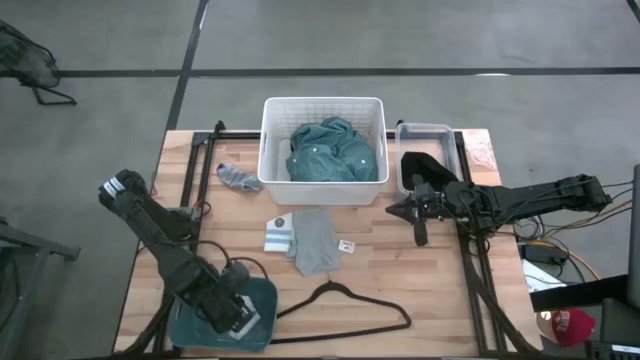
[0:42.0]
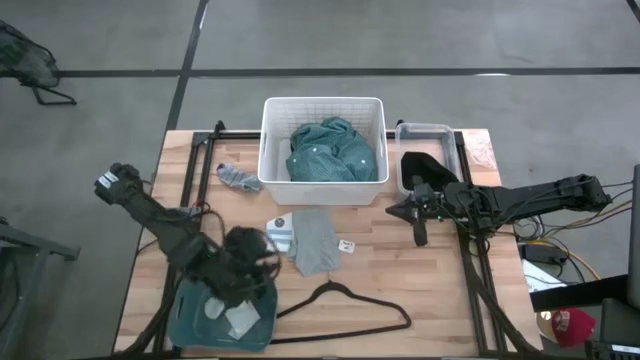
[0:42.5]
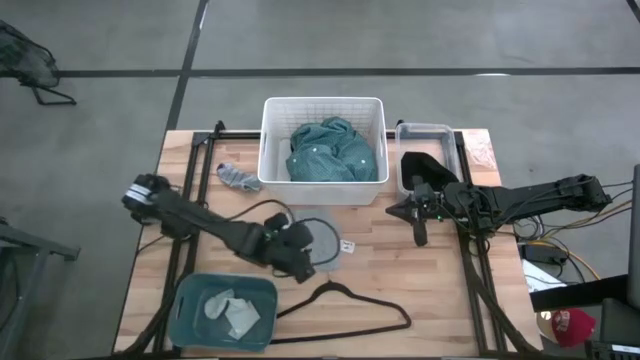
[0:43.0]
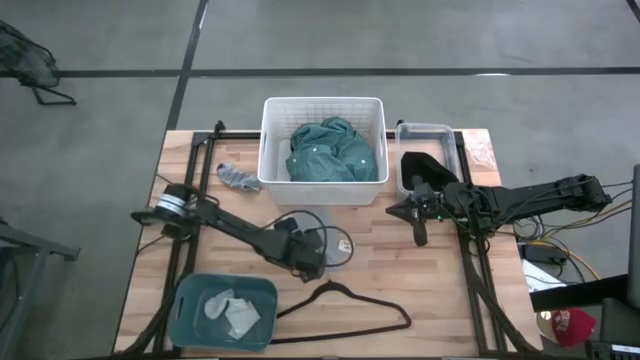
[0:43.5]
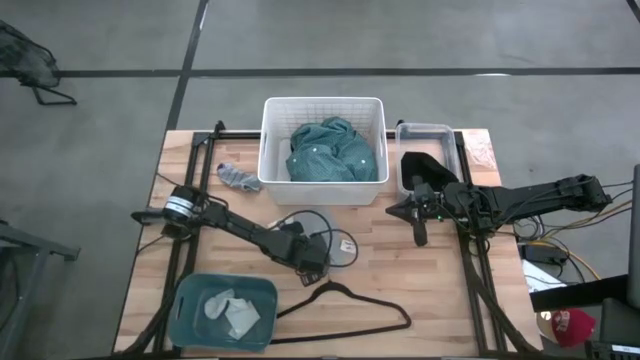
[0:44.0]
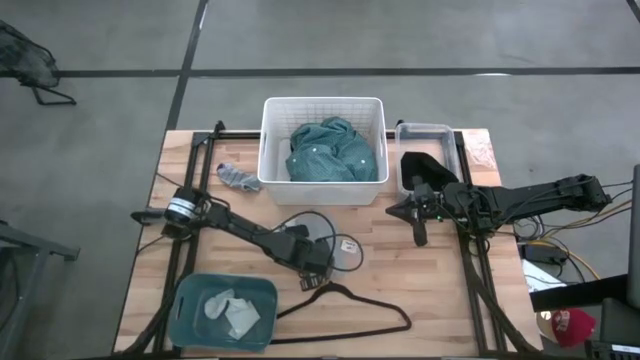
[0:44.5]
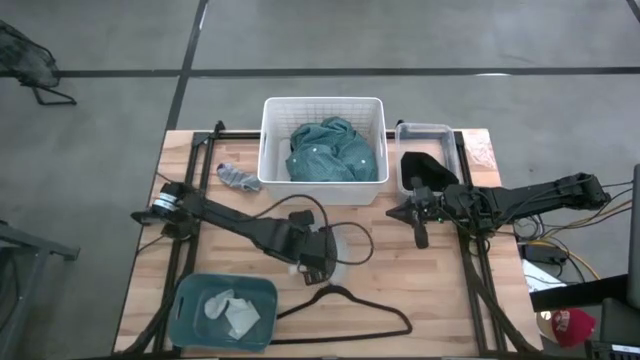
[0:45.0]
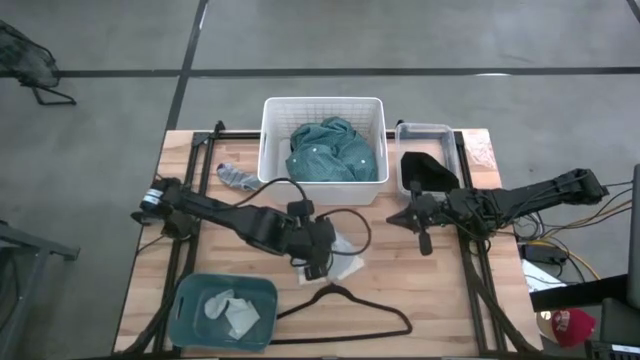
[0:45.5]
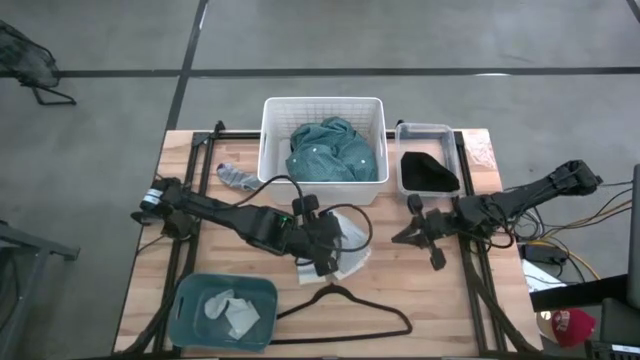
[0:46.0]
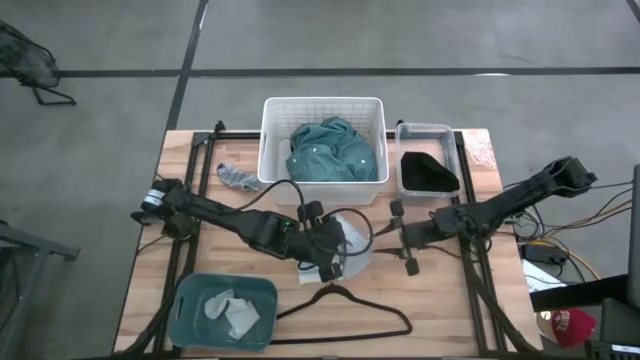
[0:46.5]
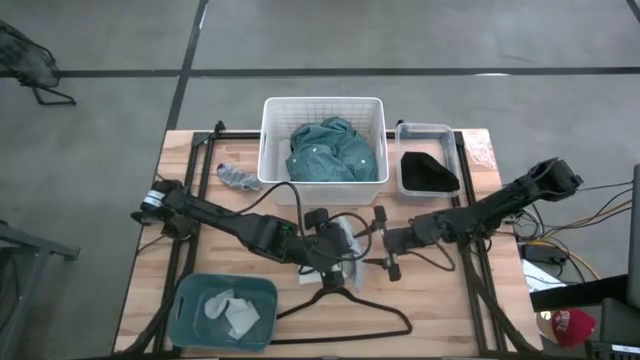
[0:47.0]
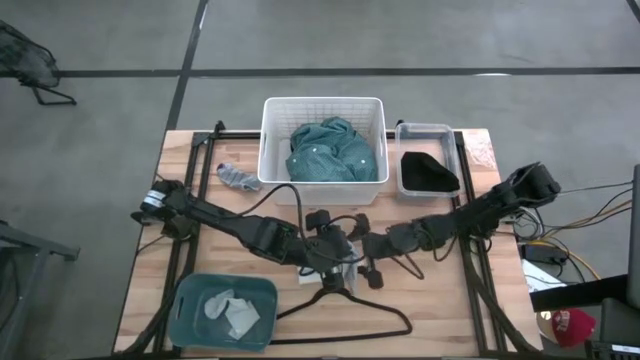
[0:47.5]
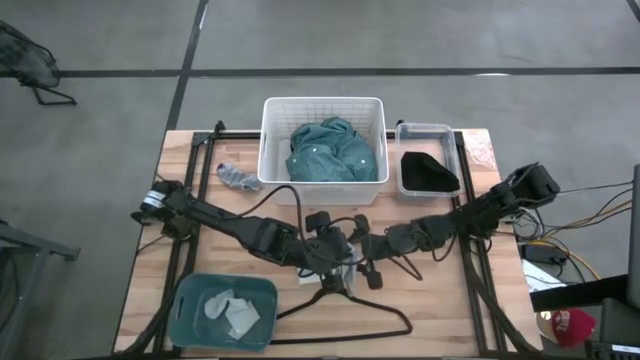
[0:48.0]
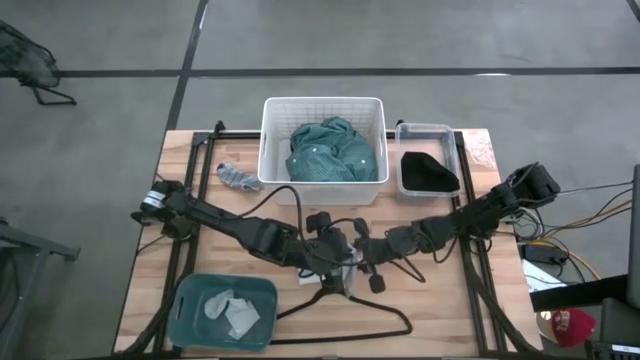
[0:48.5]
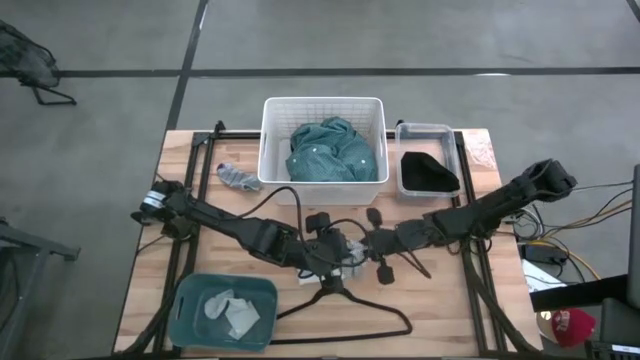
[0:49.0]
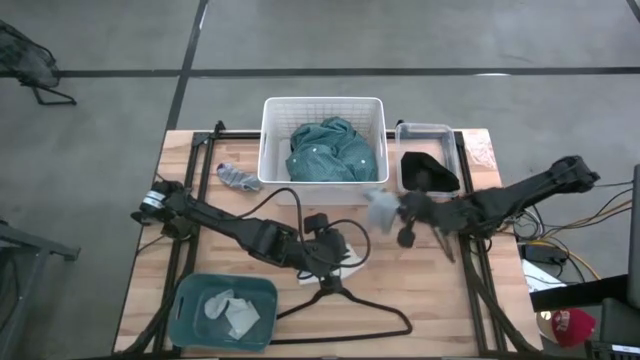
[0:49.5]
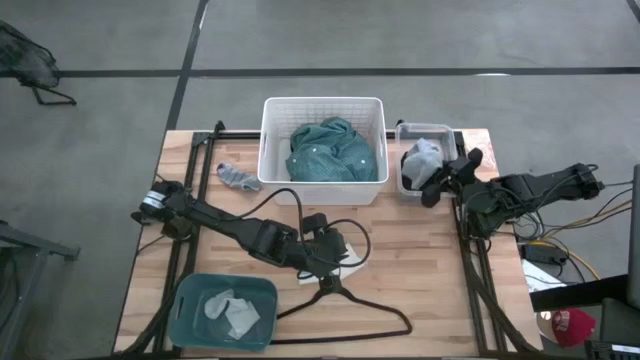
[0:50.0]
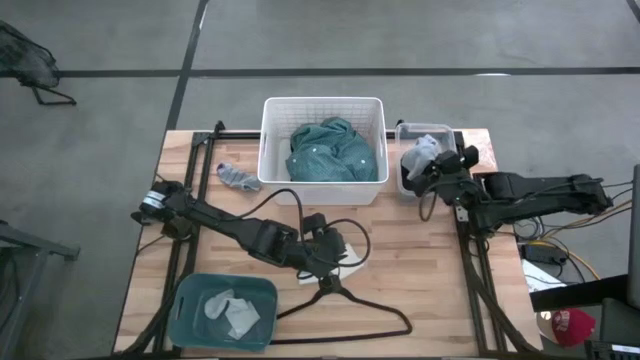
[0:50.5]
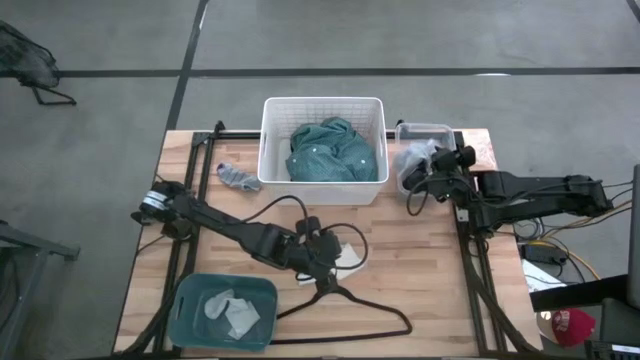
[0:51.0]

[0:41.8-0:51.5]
Task: Pick & Place Cloths
Put the gray boxer into the transparent bin

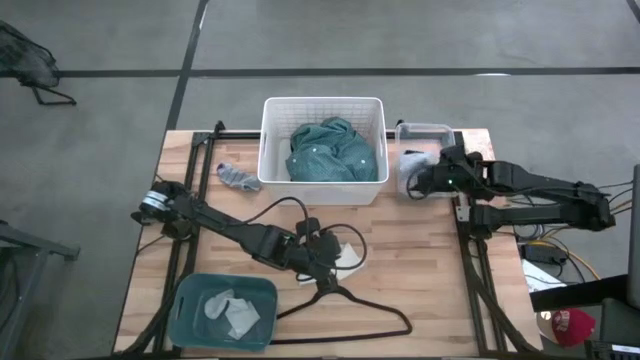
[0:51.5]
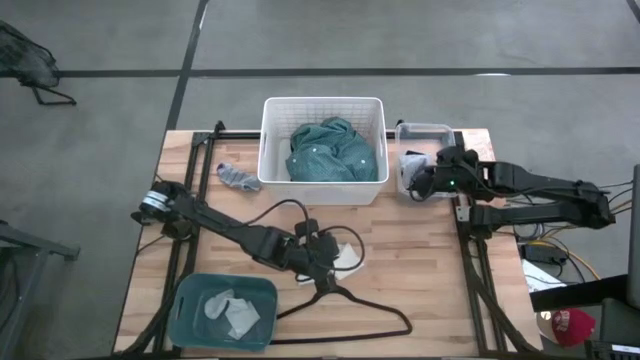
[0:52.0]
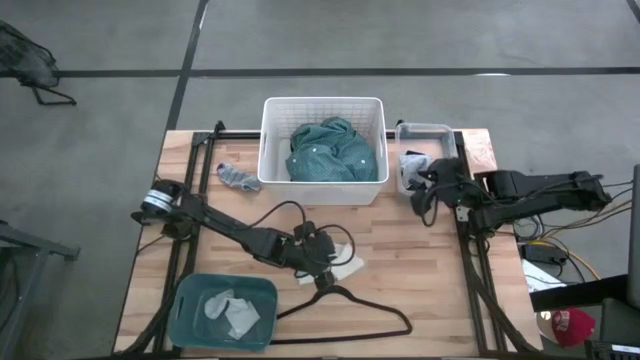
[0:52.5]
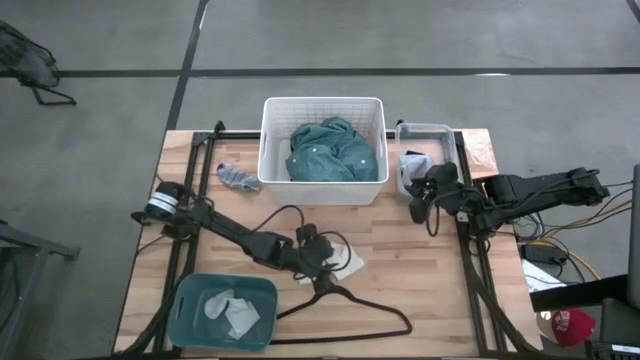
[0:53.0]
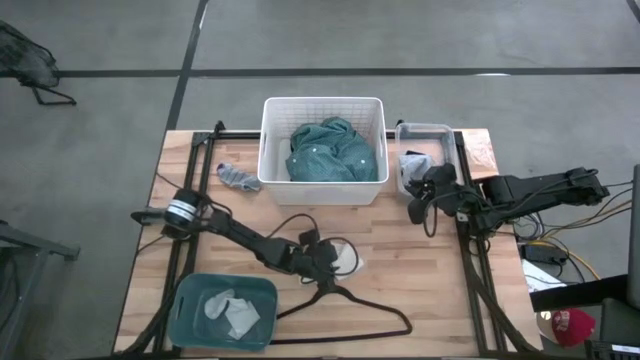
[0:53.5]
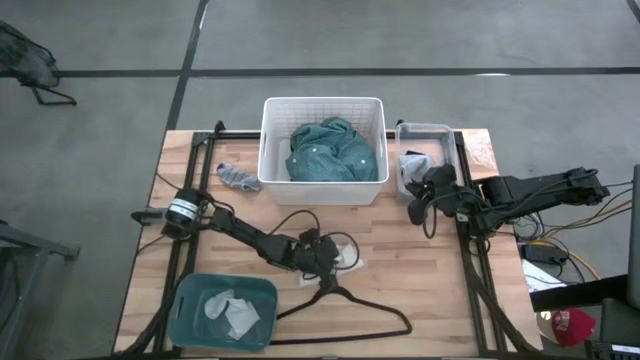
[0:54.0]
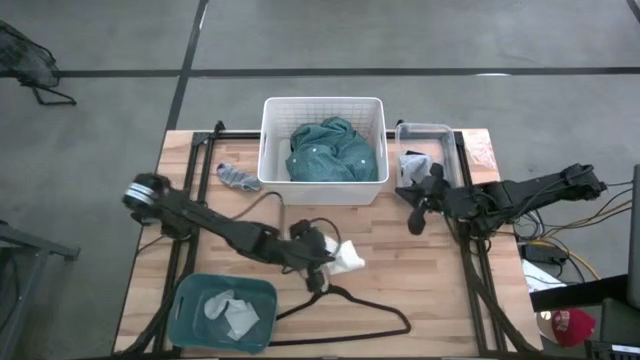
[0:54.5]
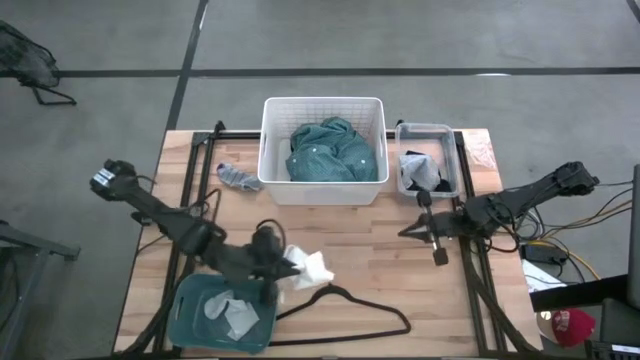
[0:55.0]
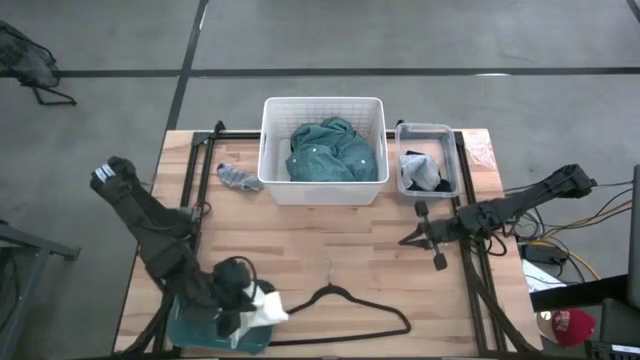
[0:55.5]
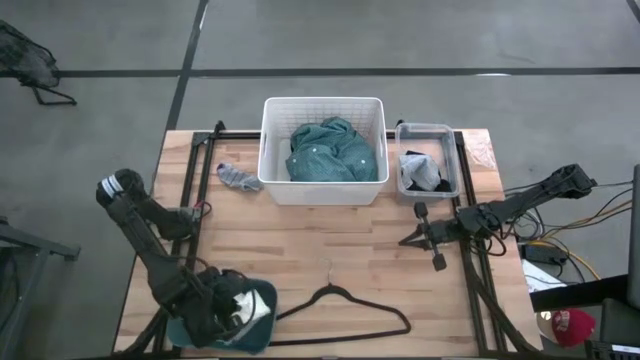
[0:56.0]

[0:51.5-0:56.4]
Put the white sock into the dark blue bin

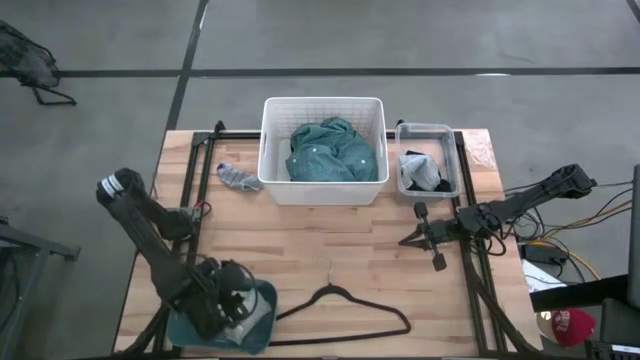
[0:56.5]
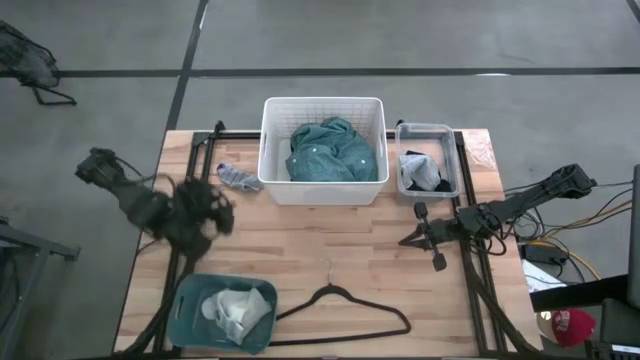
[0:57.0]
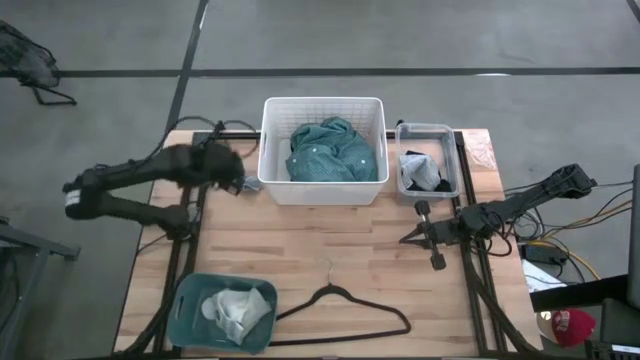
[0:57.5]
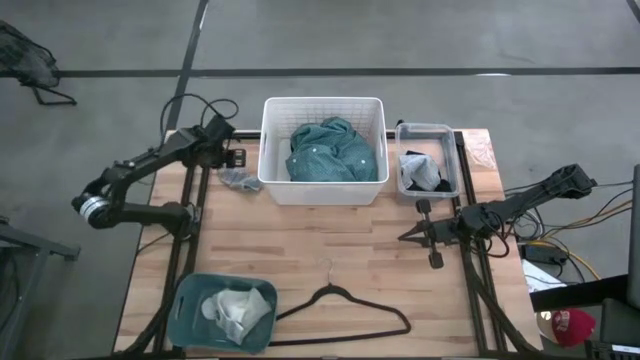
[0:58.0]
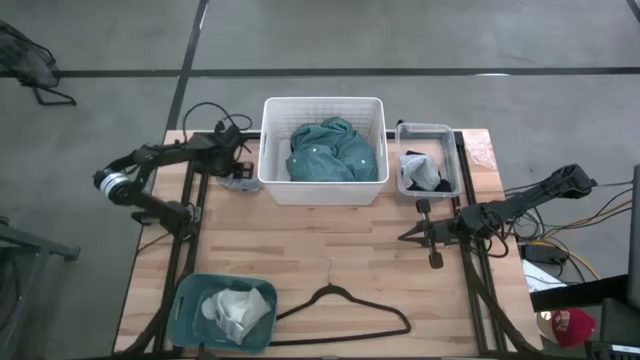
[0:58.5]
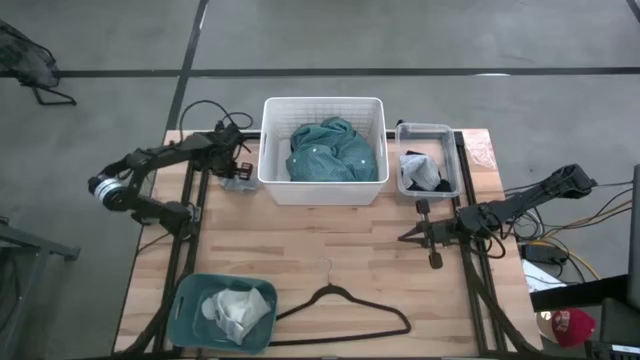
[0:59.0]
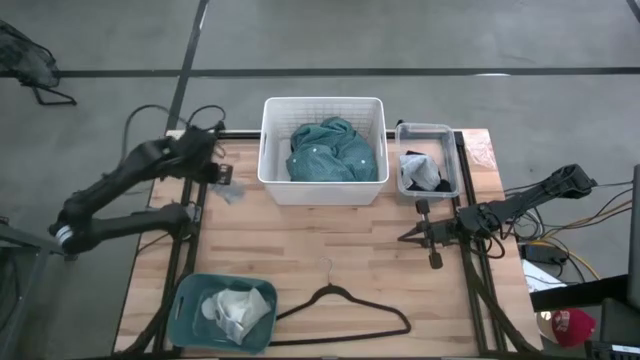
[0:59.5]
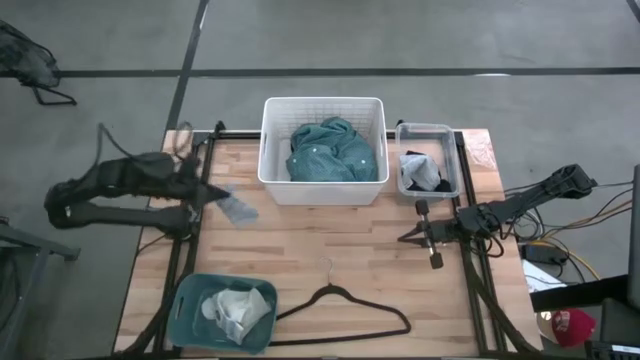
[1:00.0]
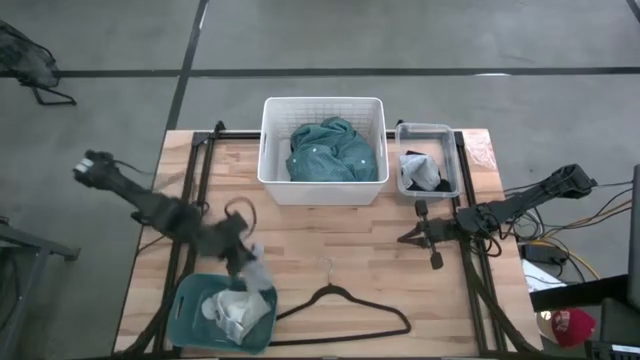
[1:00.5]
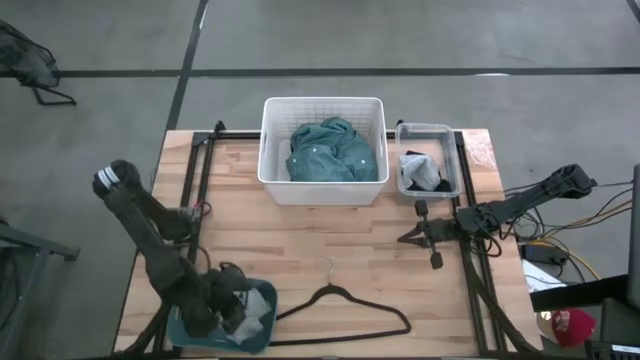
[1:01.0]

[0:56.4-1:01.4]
Put the gray sock into the dark blue bin

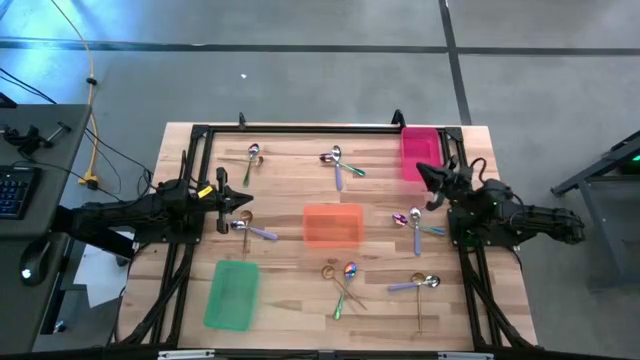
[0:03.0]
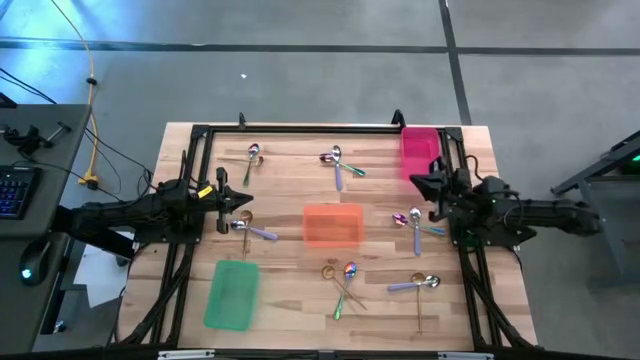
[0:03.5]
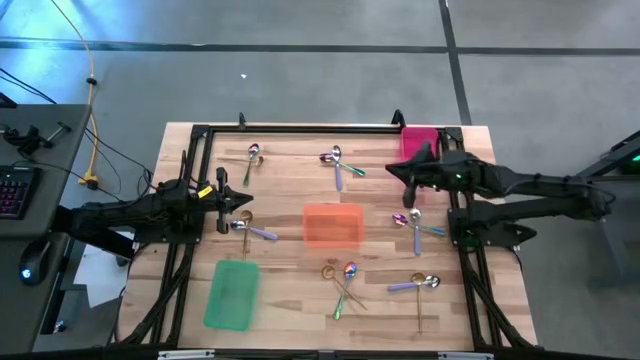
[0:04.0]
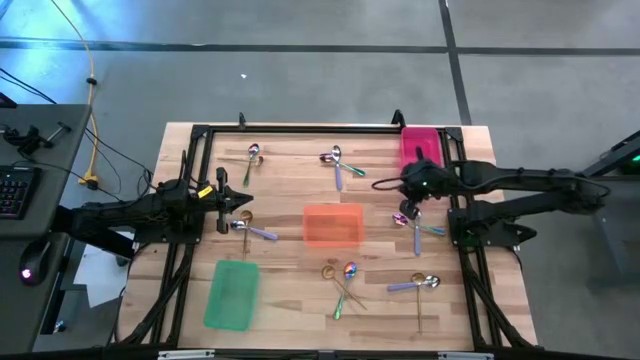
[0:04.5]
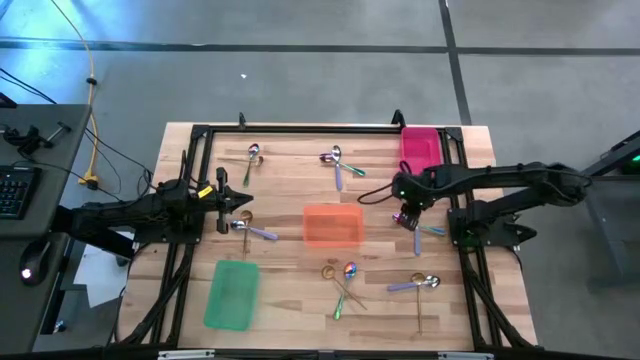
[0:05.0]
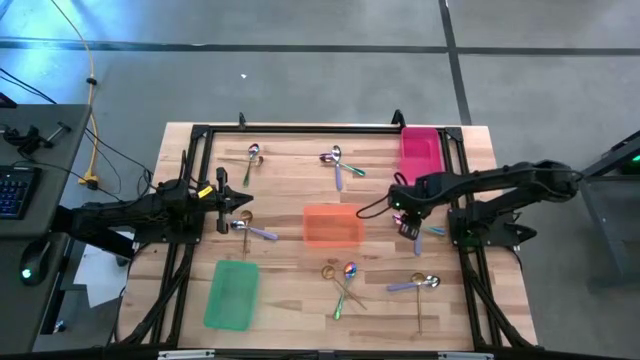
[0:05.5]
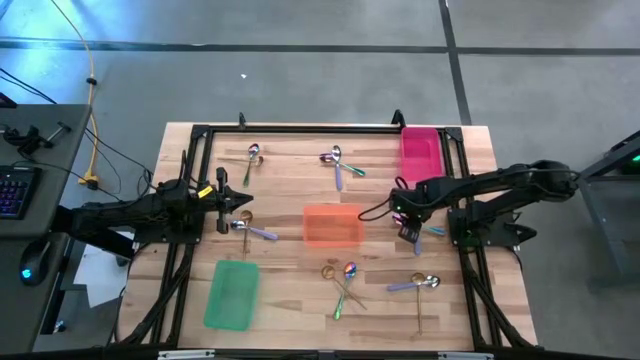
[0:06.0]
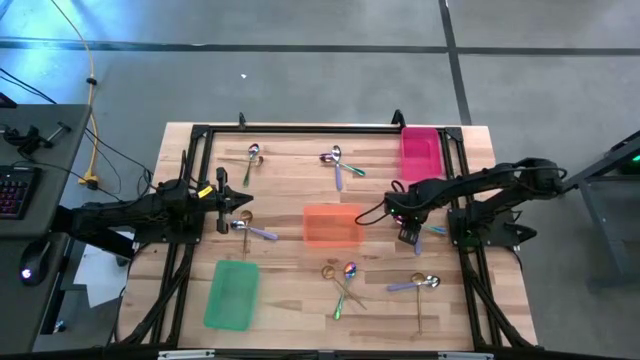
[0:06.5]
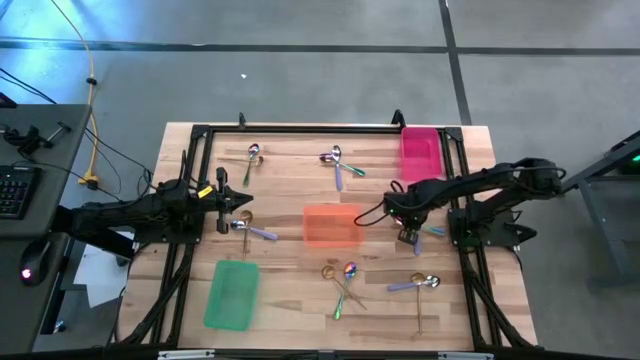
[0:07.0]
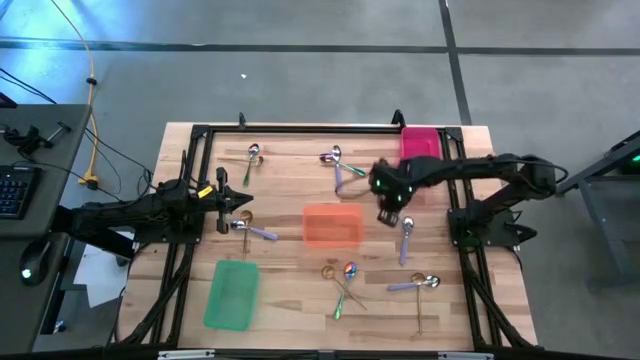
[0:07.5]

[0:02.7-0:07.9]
Task: Sort silverware by color (type)
Put the right multicolored spoon into the red bin
